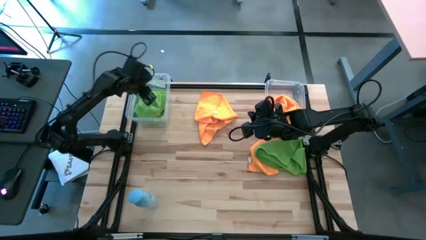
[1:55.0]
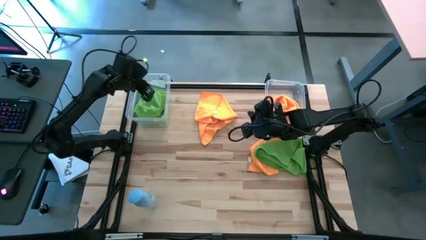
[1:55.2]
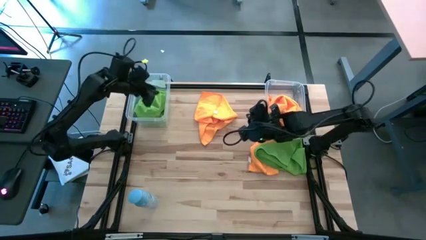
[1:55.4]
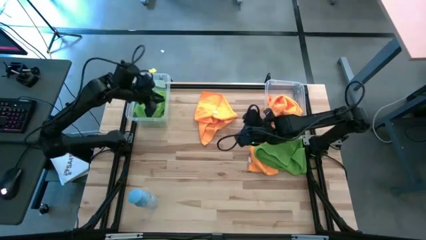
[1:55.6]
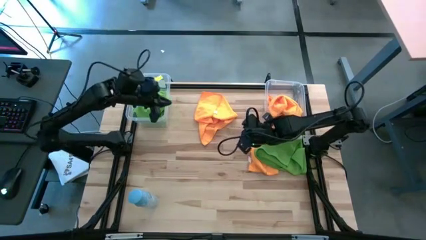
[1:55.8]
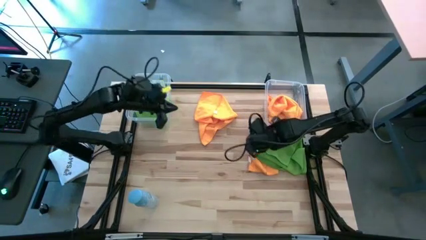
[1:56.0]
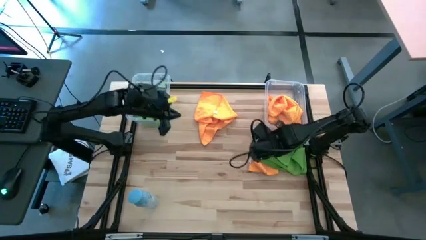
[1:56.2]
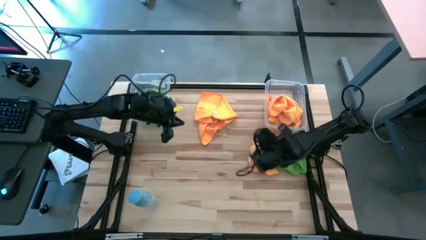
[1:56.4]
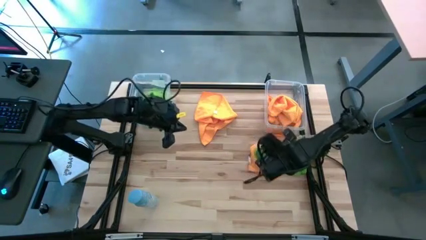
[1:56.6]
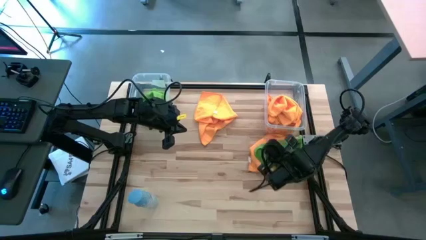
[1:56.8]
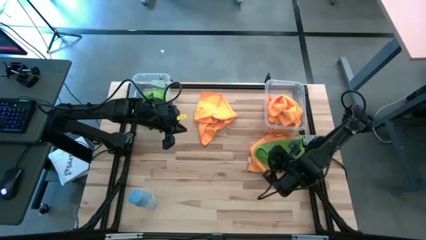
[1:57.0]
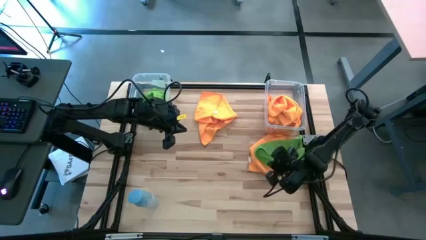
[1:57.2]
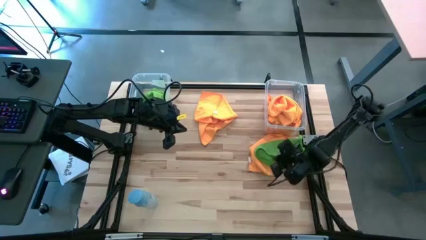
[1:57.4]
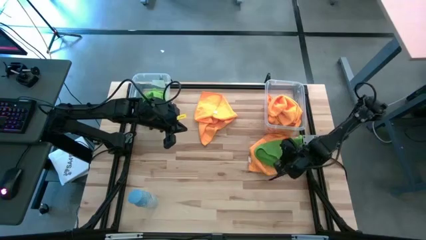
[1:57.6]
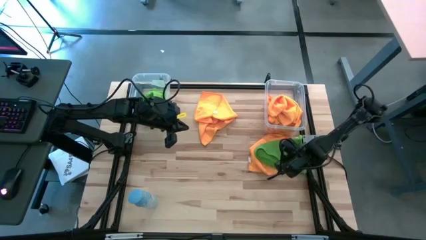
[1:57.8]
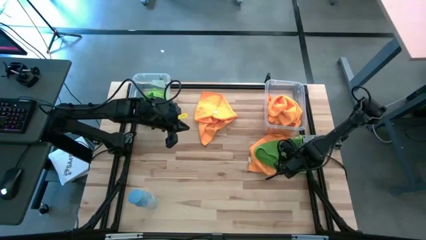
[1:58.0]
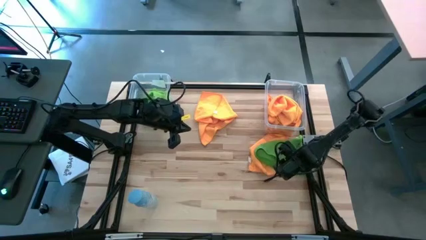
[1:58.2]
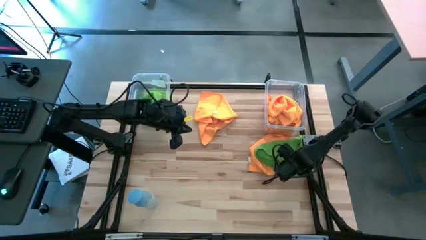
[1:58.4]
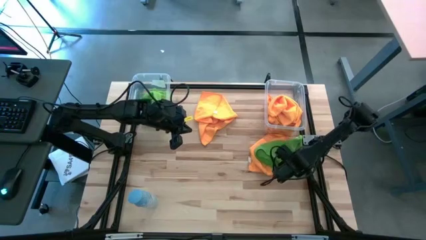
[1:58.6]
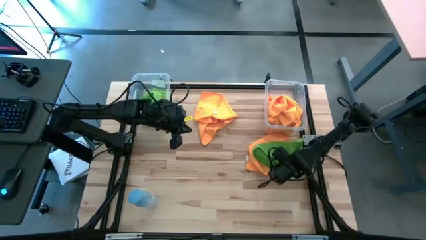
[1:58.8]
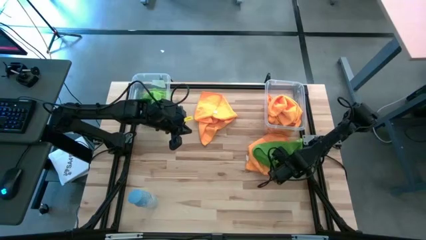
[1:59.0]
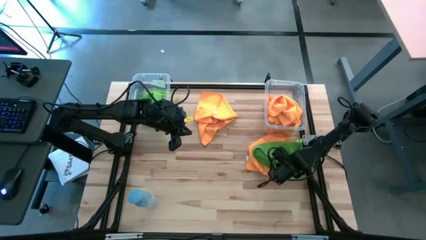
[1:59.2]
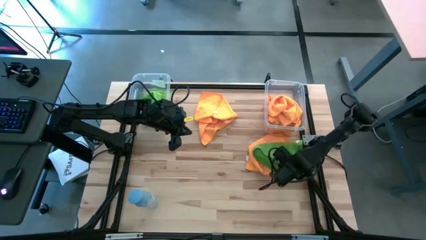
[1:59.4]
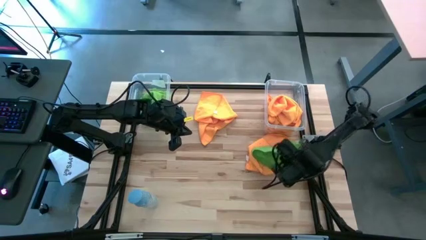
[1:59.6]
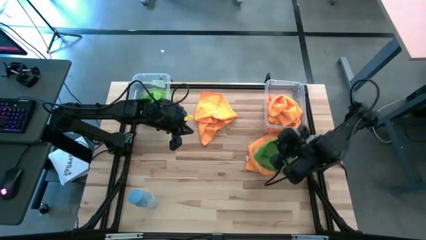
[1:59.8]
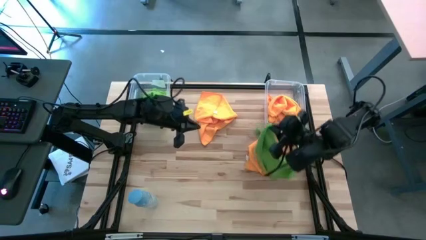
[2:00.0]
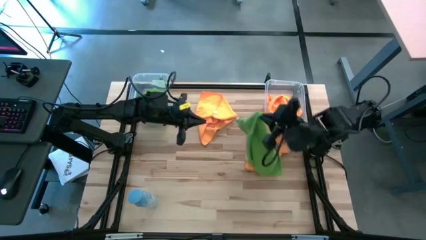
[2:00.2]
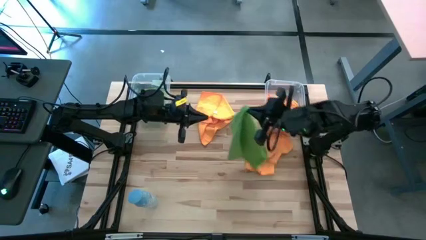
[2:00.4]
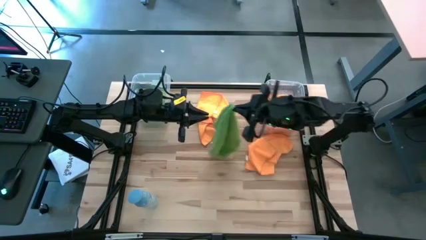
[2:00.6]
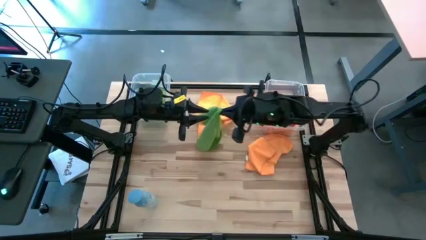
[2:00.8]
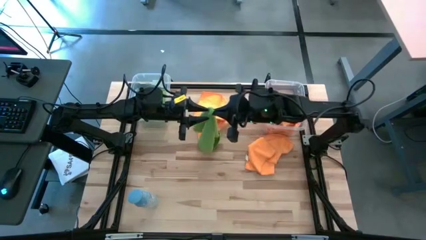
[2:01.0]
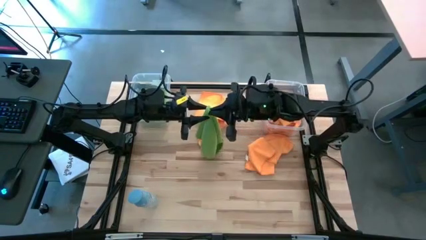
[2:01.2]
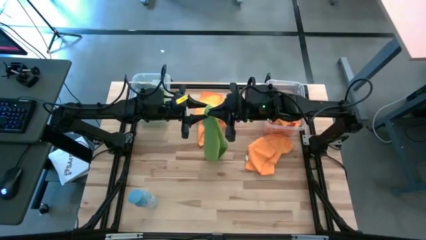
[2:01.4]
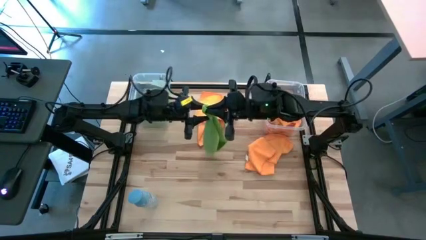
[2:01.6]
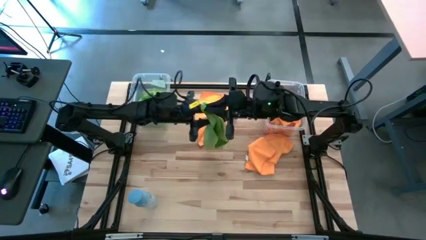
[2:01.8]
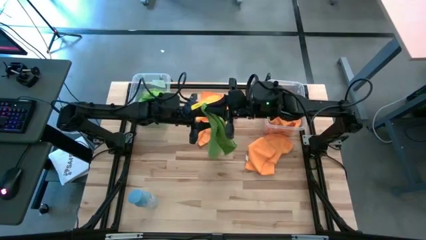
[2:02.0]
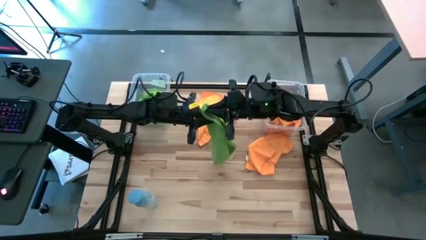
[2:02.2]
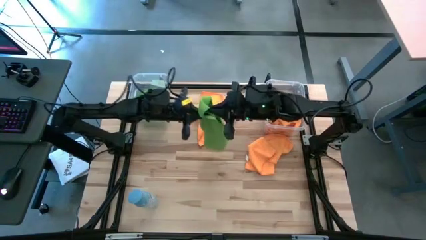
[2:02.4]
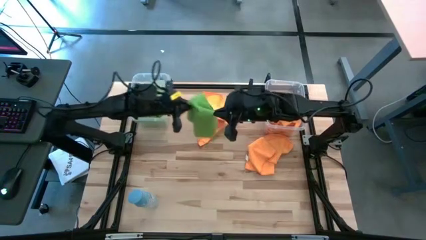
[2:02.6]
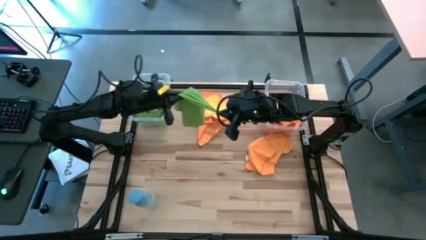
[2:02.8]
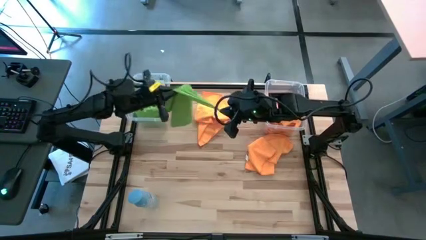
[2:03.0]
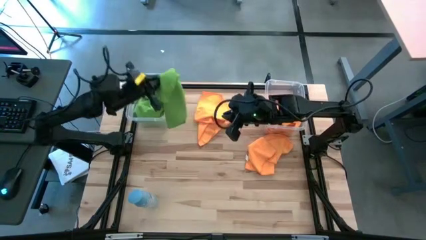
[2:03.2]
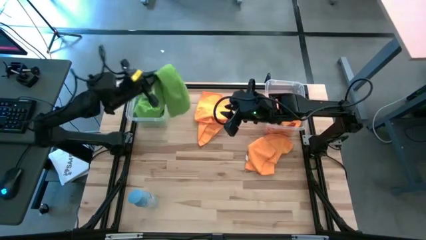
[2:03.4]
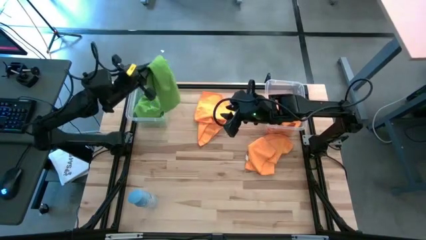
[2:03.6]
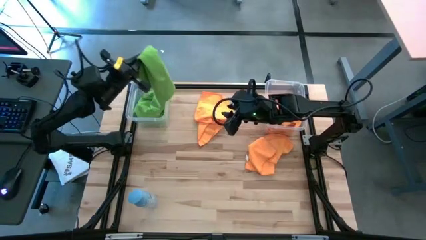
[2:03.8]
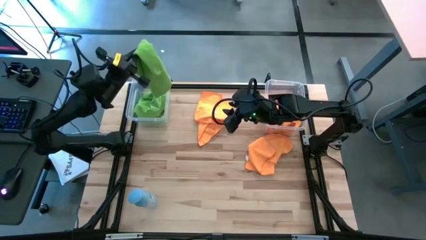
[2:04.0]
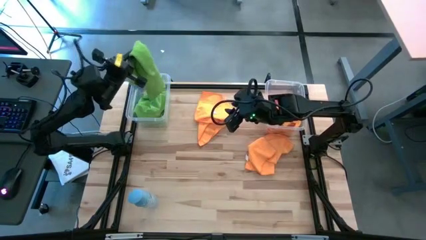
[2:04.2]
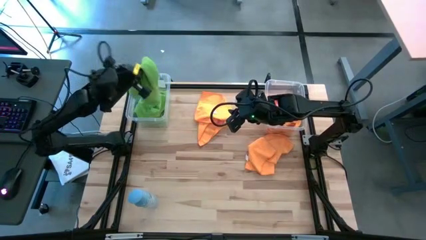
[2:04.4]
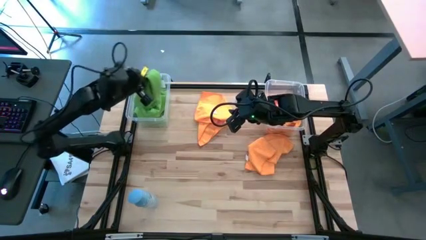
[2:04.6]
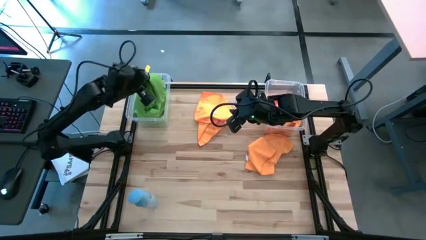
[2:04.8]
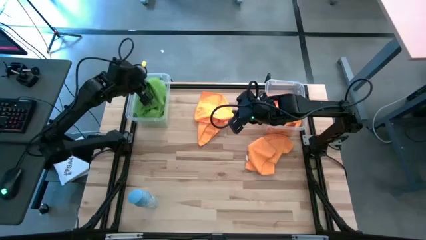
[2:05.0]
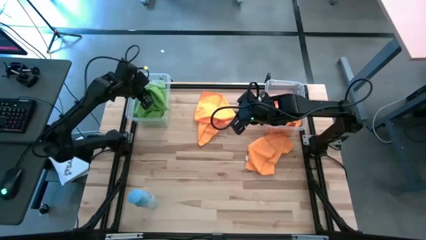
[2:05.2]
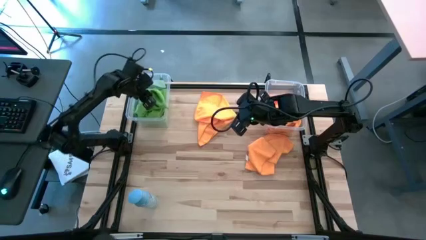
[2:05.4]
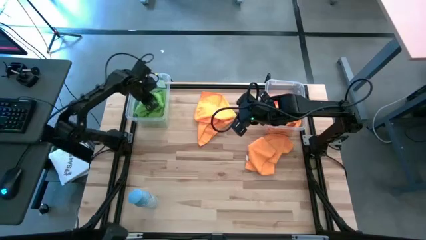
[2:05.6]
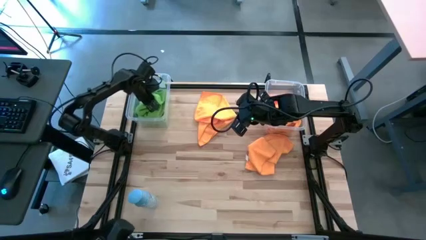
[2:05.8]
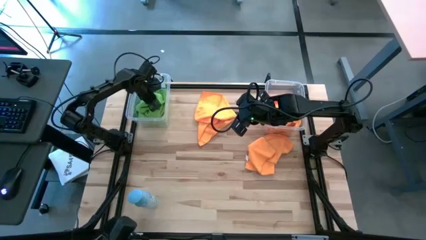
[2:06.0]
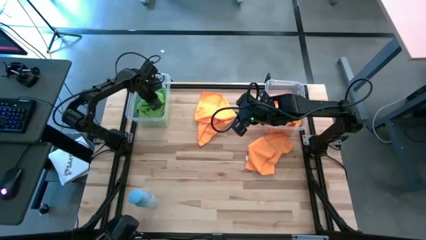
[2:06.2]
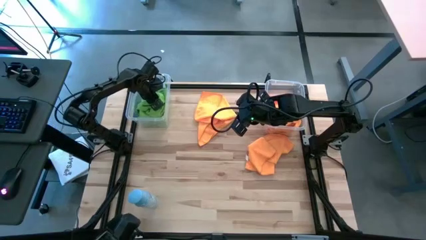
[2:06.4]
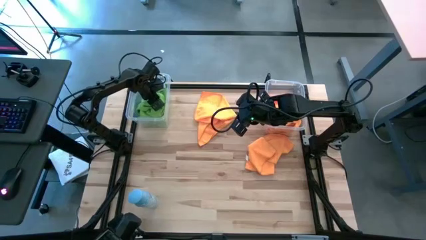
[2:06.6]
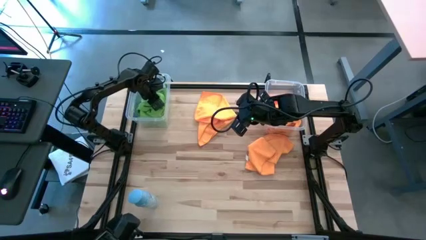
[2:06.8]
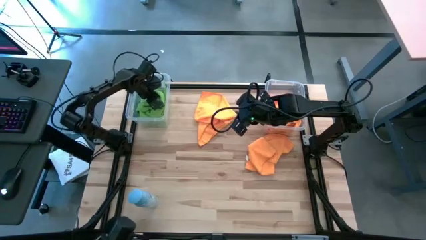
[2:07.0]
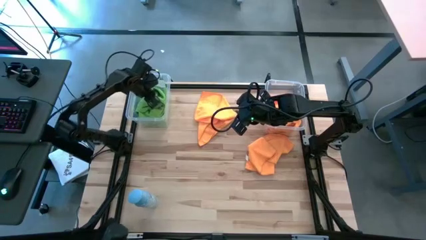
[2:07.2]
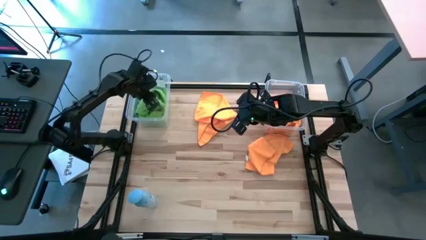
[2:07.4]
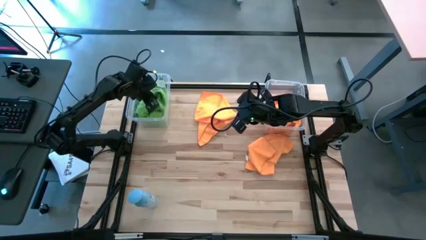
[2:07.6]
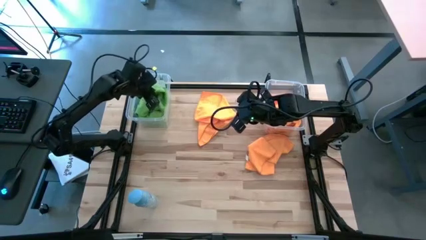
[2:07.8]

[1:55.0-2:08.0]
Task: Sort microfiber towel by color & place in baskets
Put the green microfiber towel into the left transparent bin
